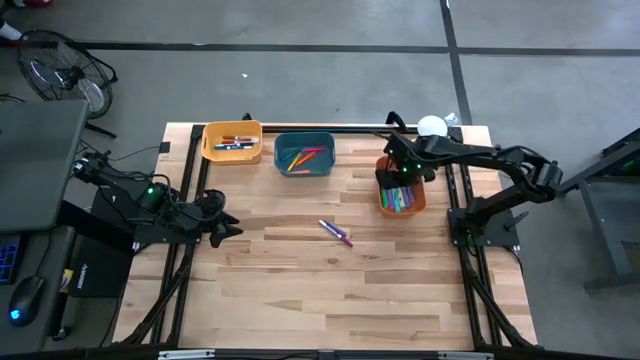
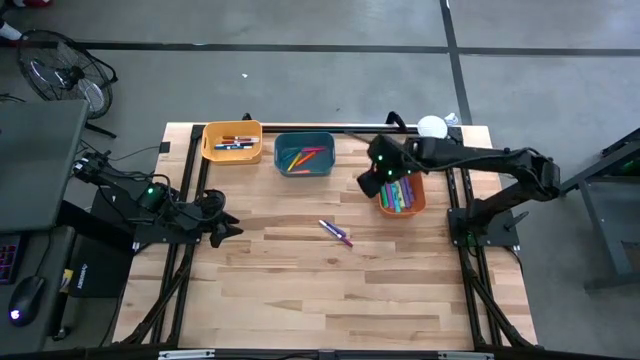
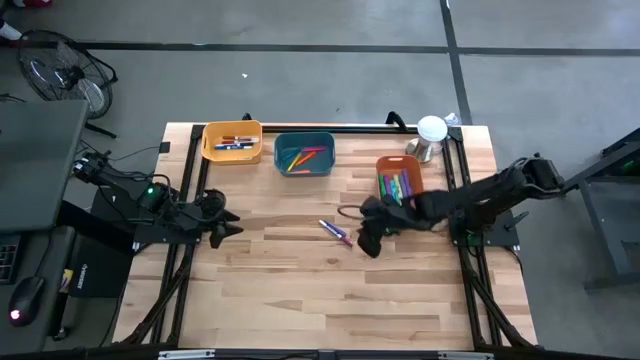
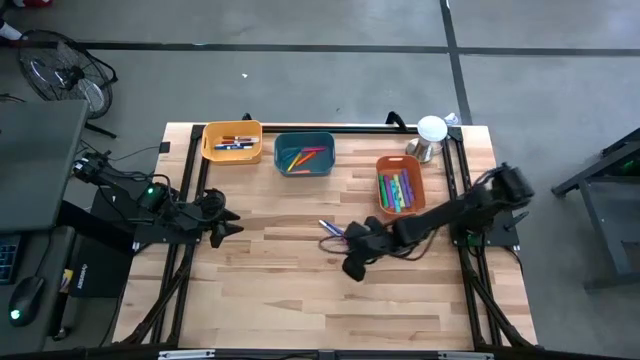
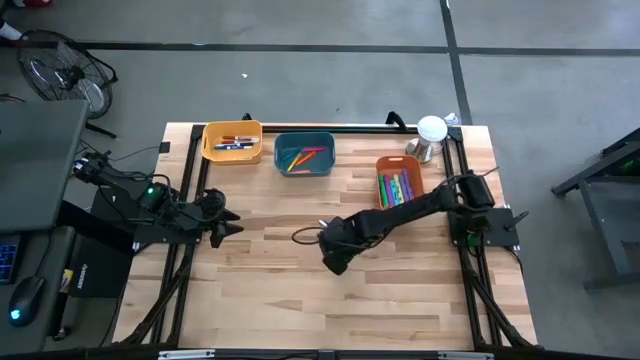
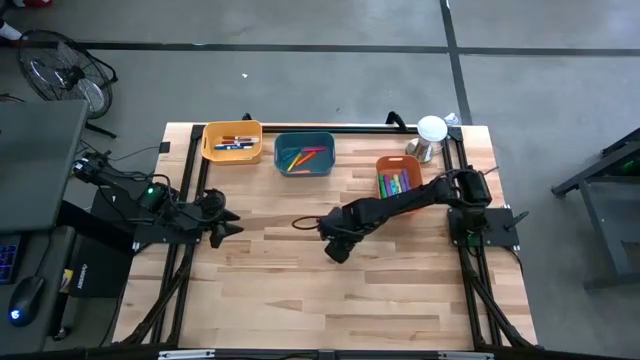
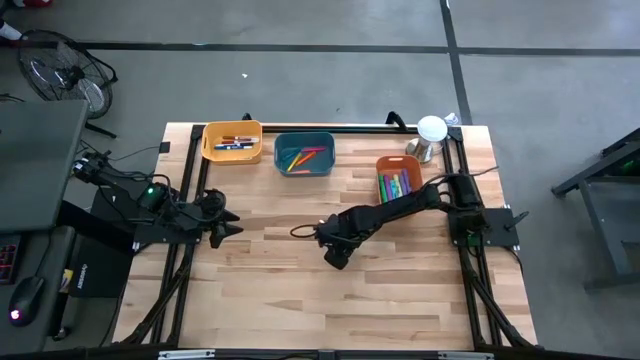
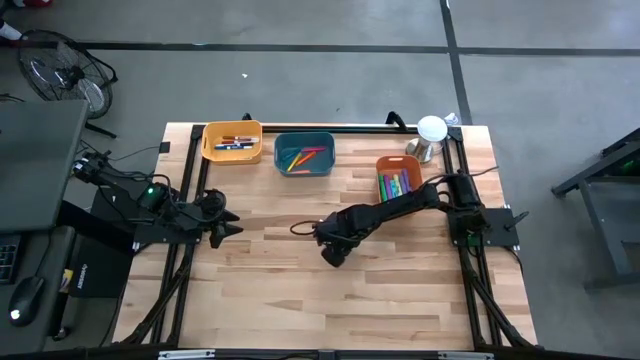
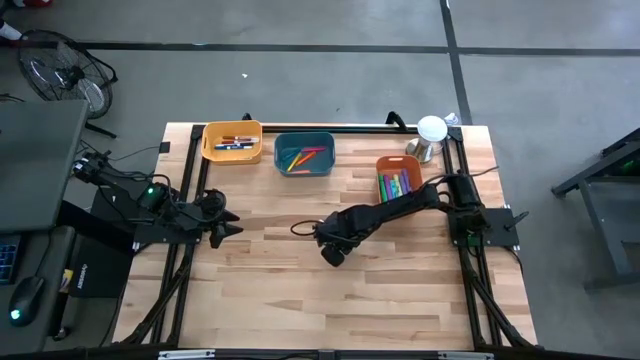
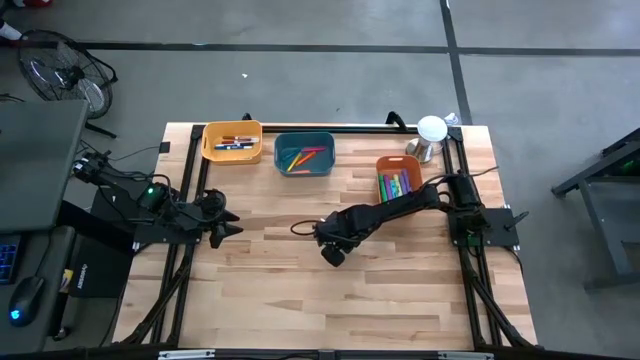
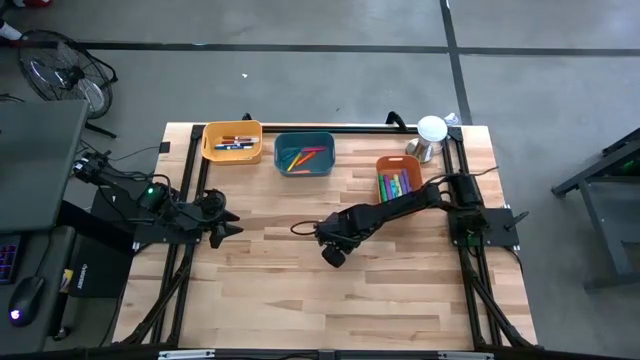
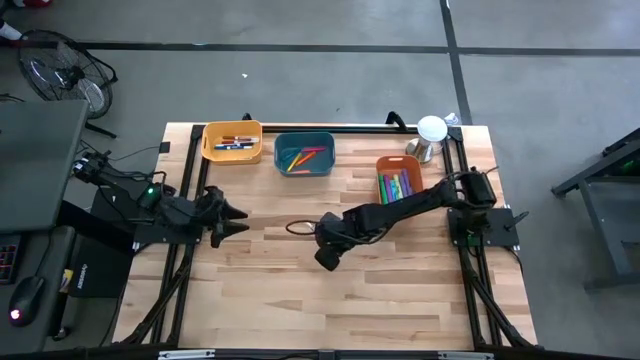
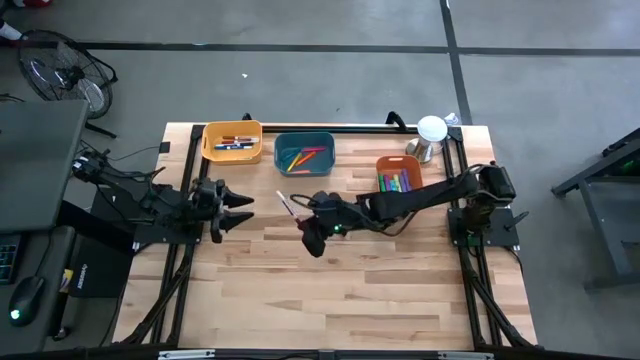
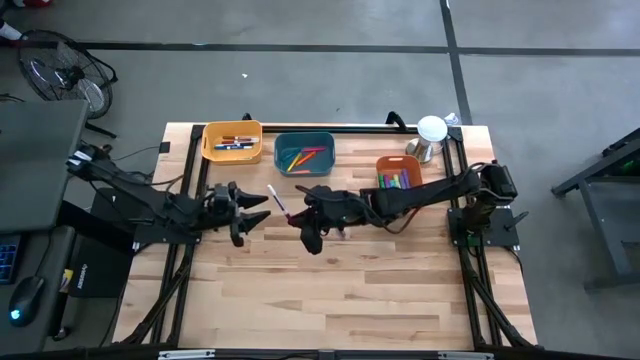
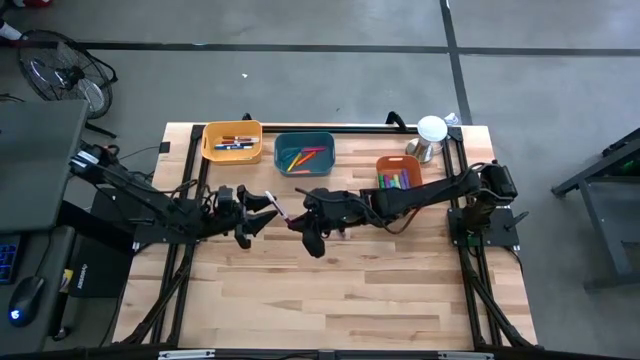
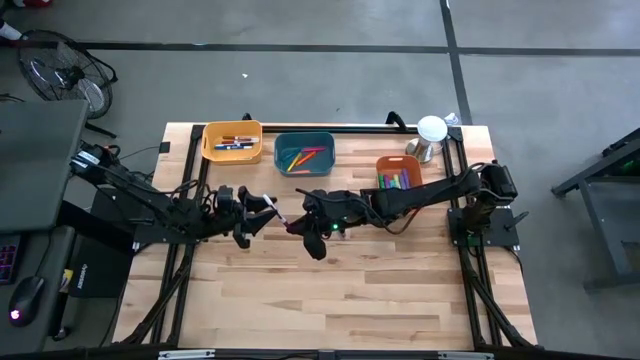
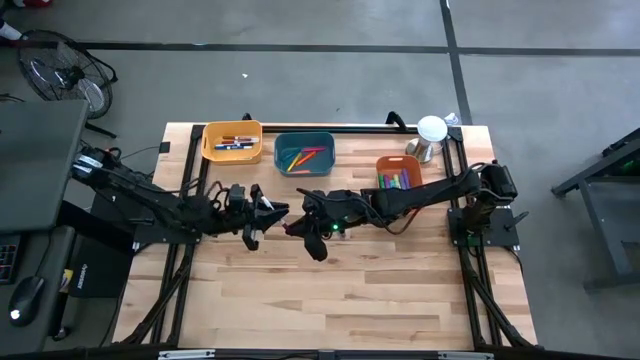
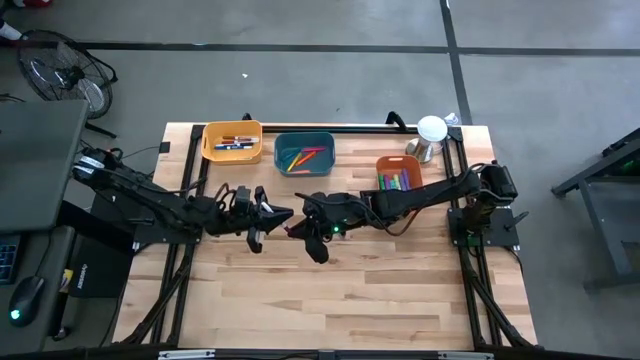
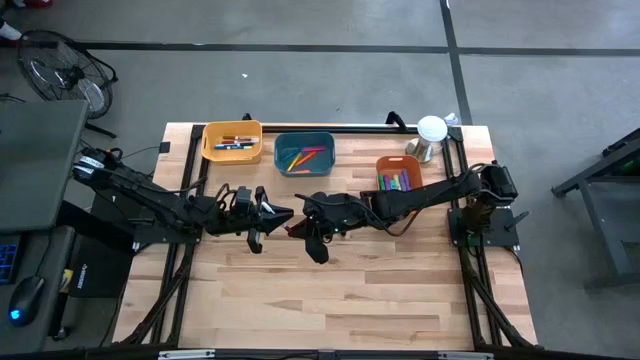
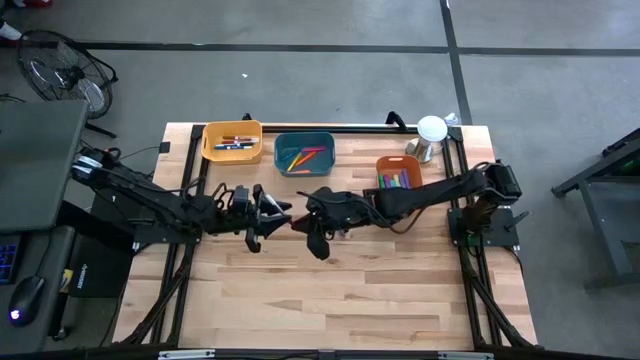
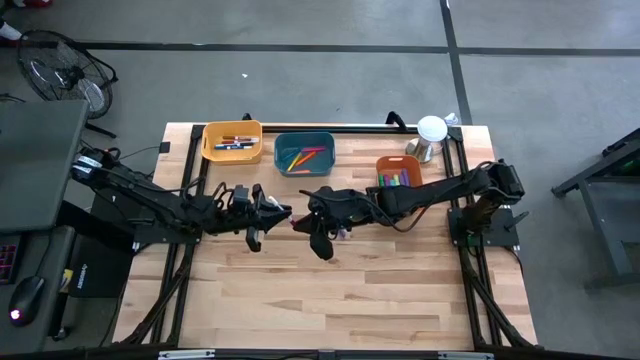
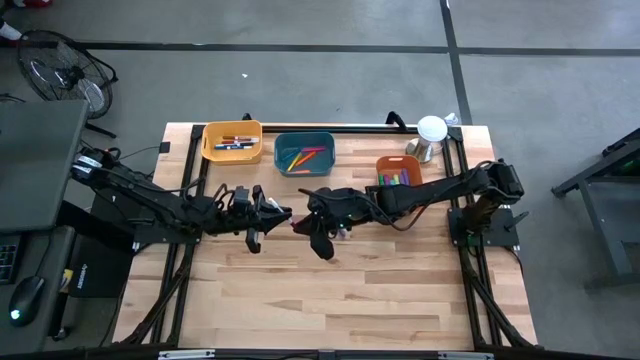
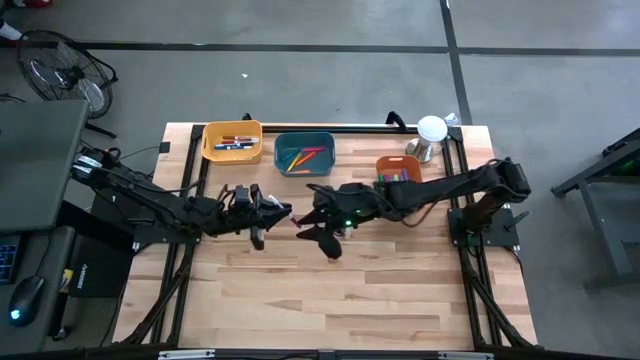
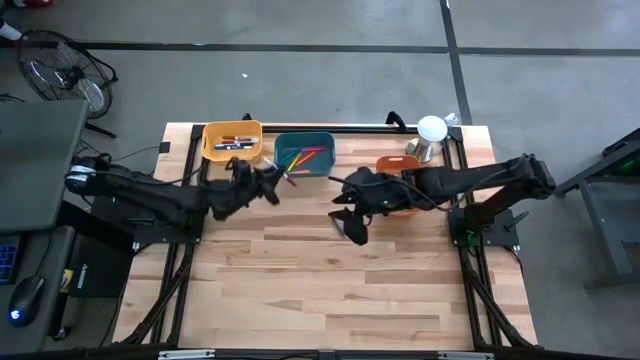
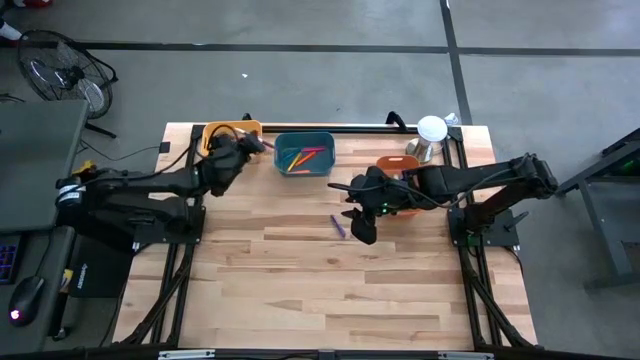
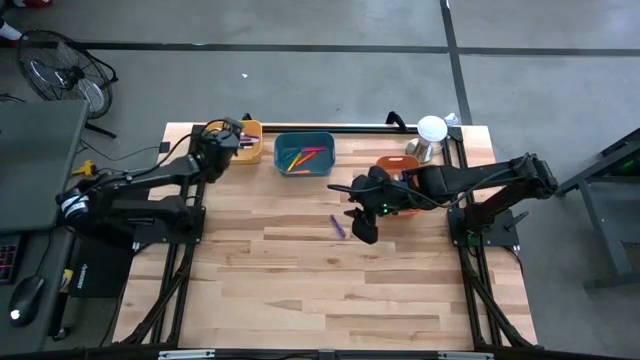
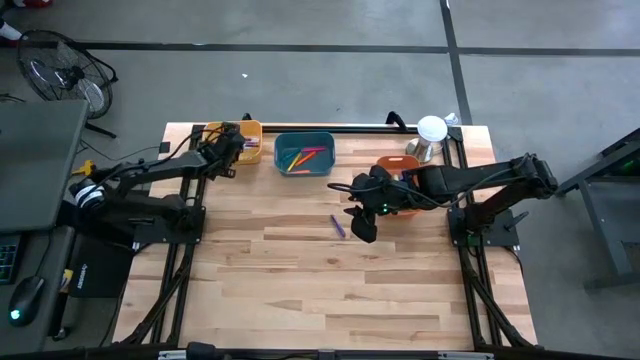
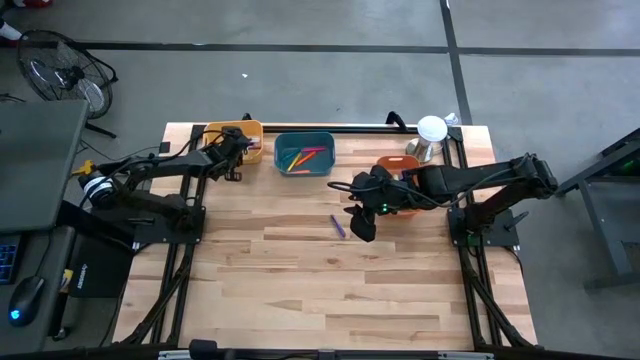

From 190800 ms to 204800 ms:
Task: Pick & Place Markers
Put the pink marker pen into the yellow bin

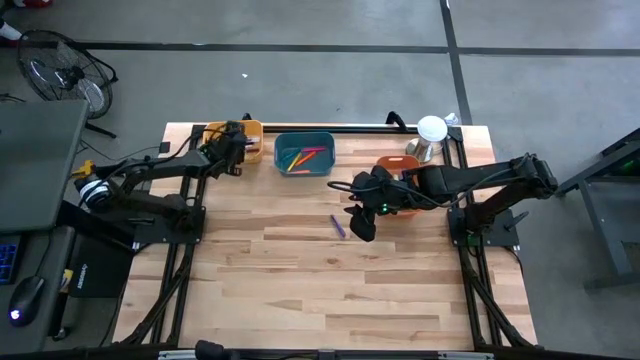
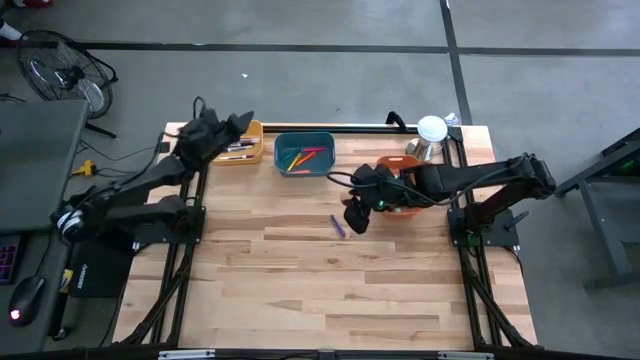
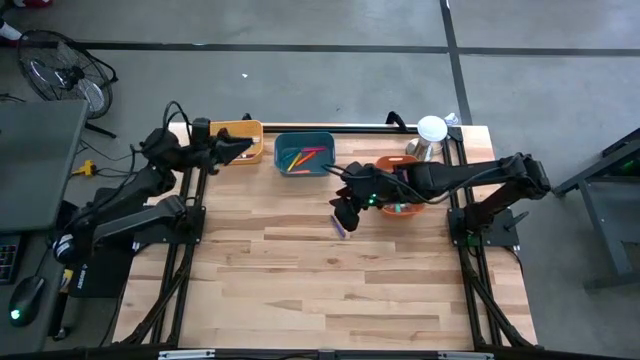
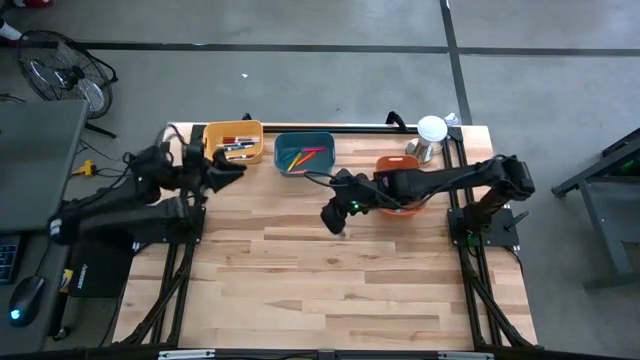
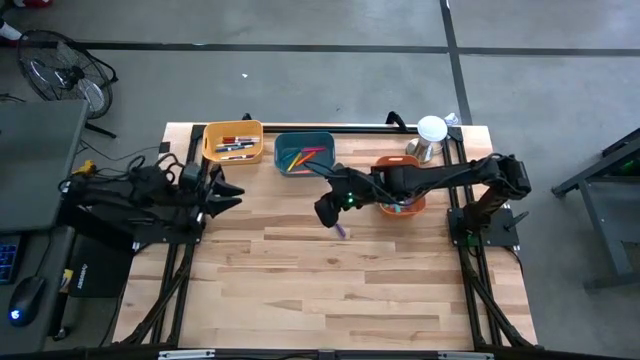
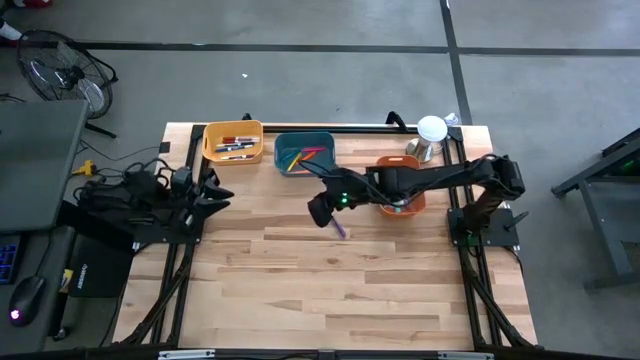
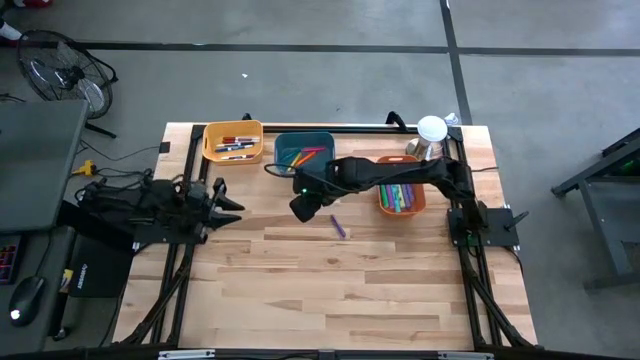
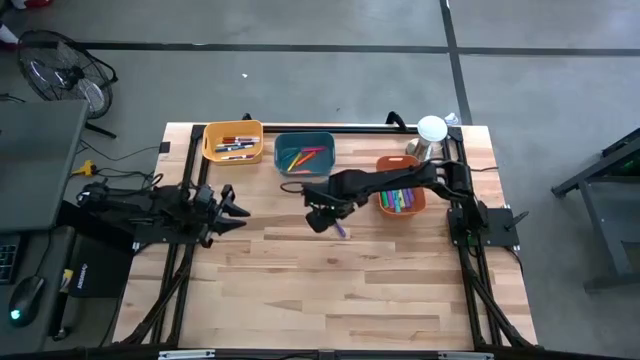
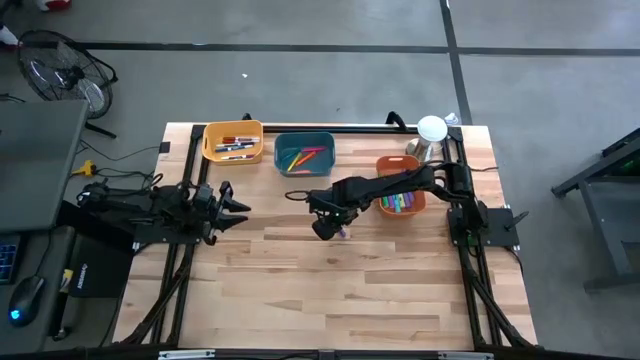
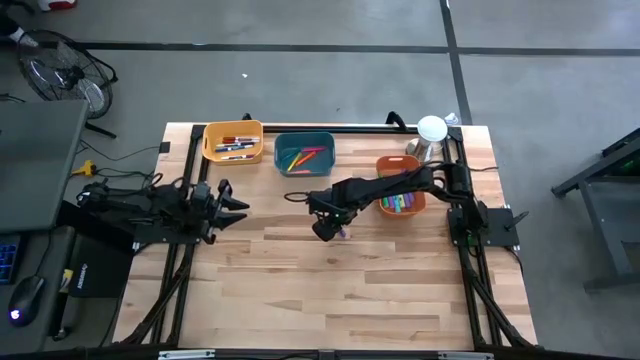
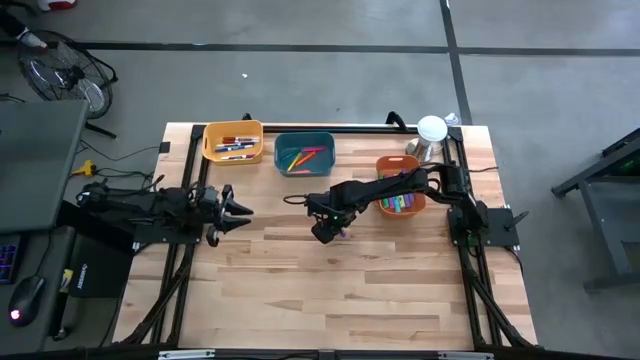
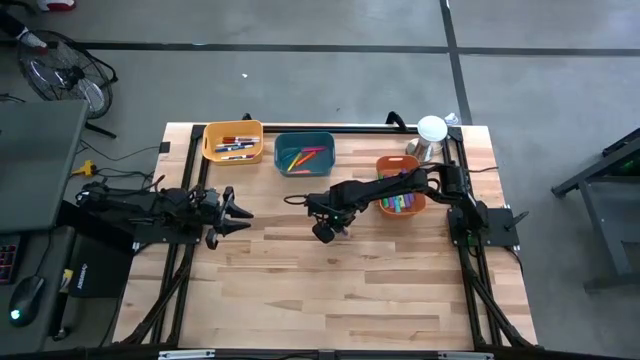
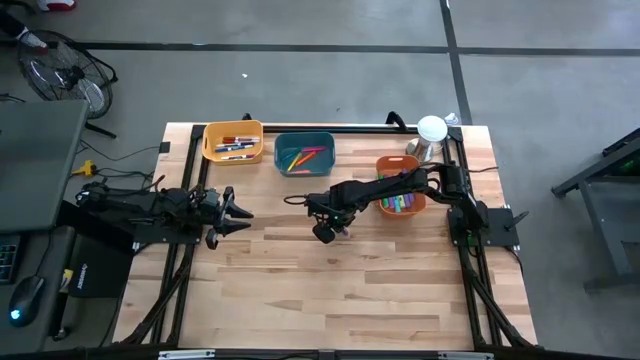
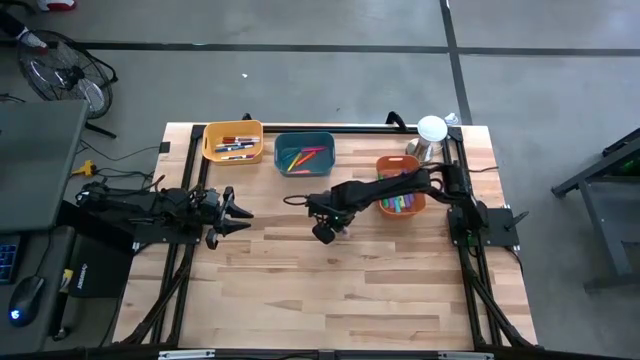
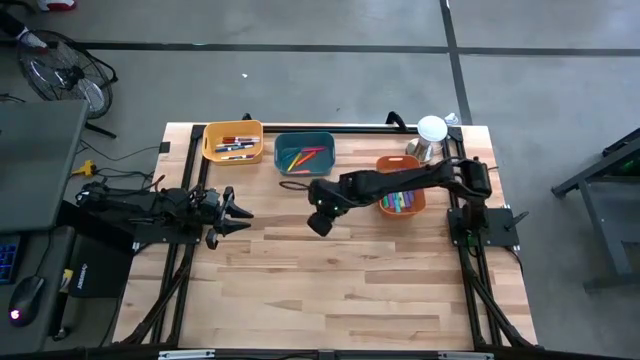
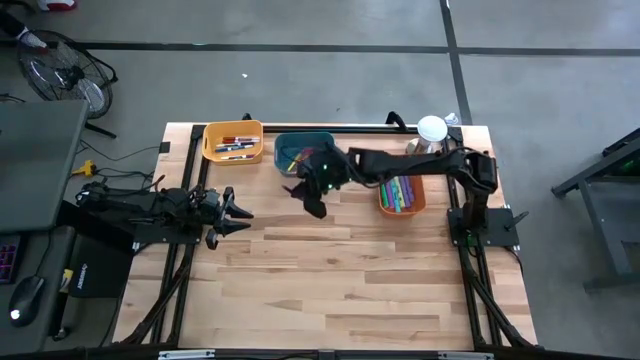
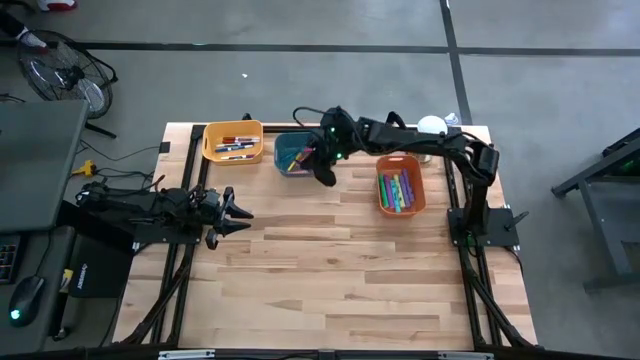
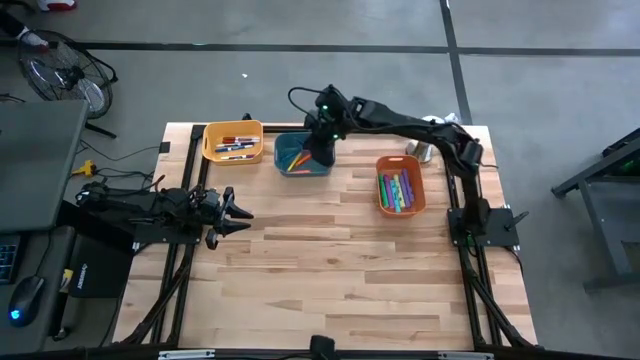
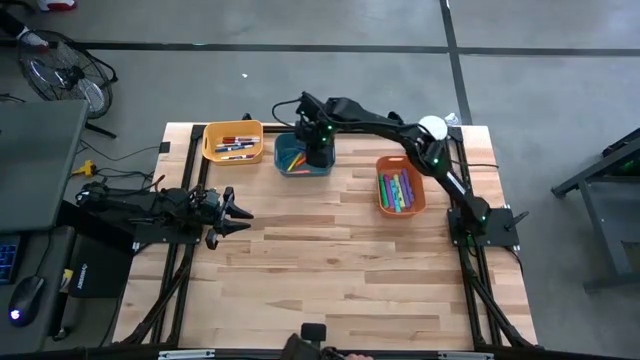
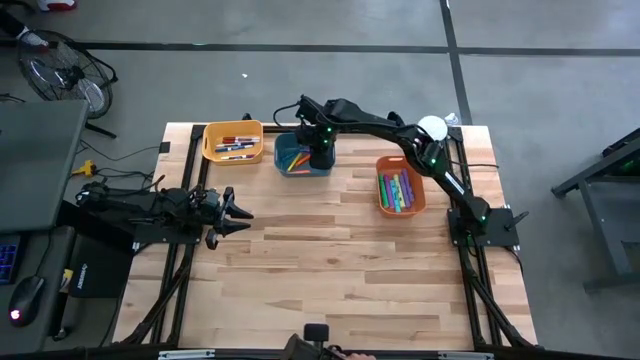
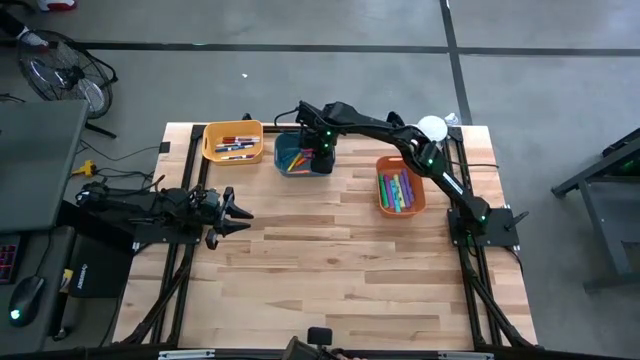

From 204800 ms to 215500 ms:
Put the purple pen into the blue bin
